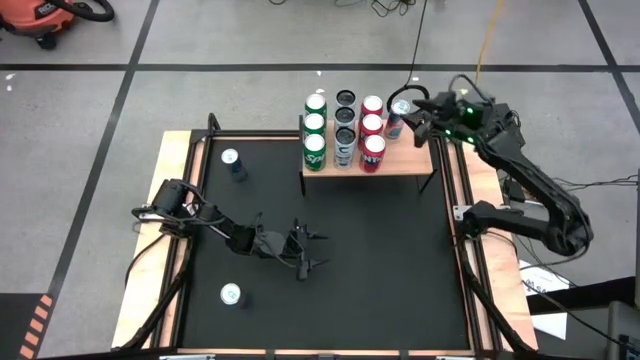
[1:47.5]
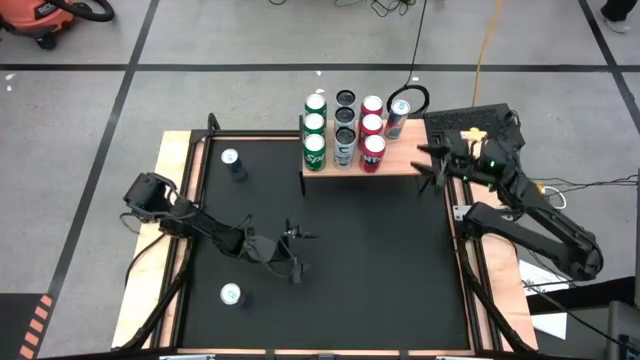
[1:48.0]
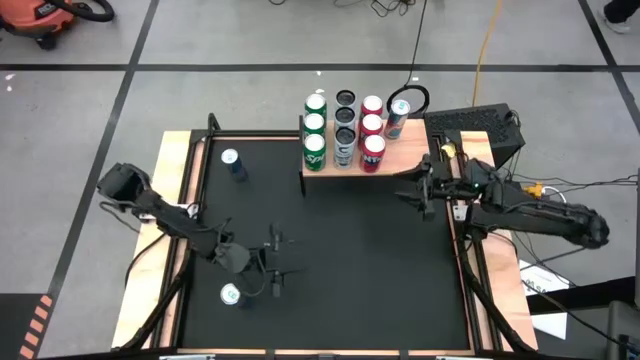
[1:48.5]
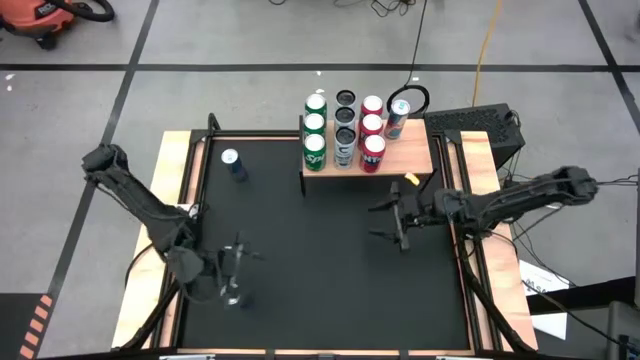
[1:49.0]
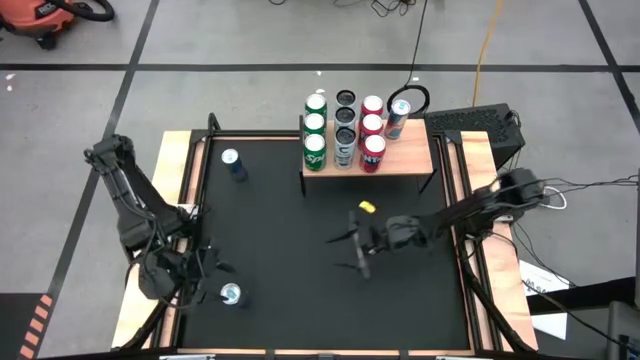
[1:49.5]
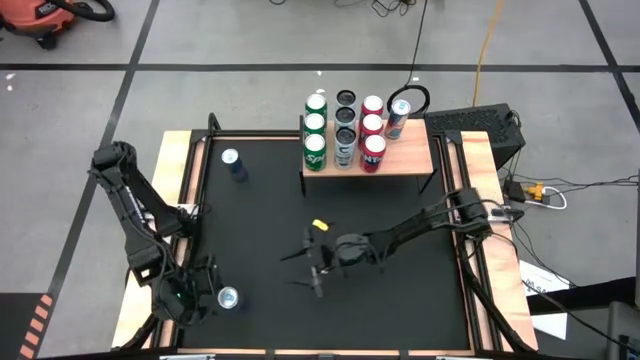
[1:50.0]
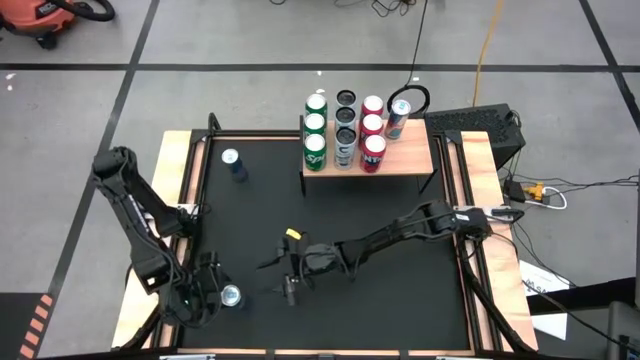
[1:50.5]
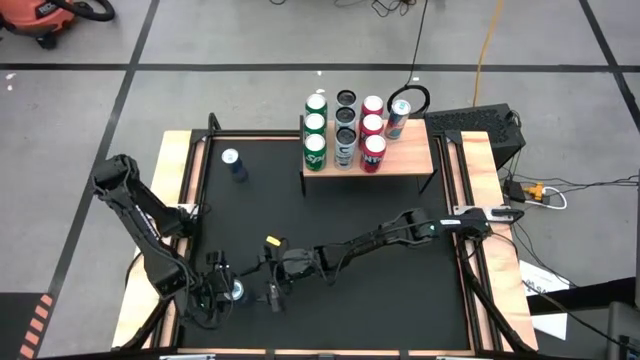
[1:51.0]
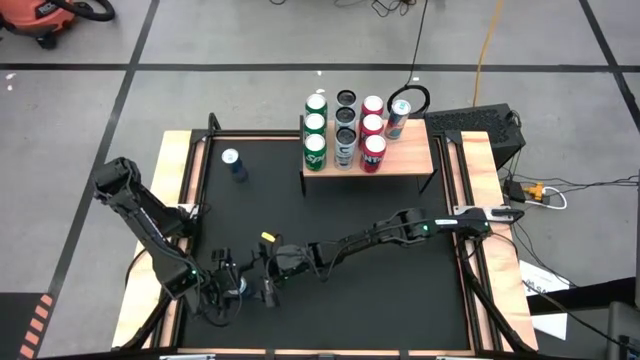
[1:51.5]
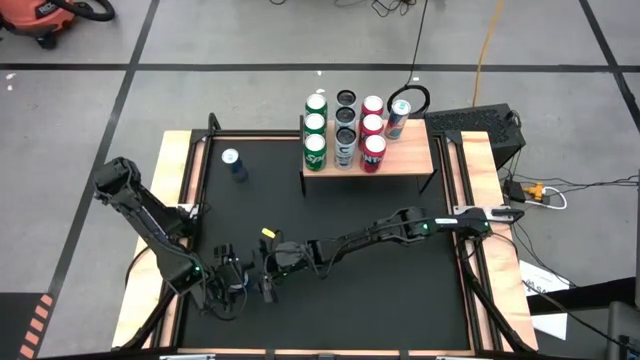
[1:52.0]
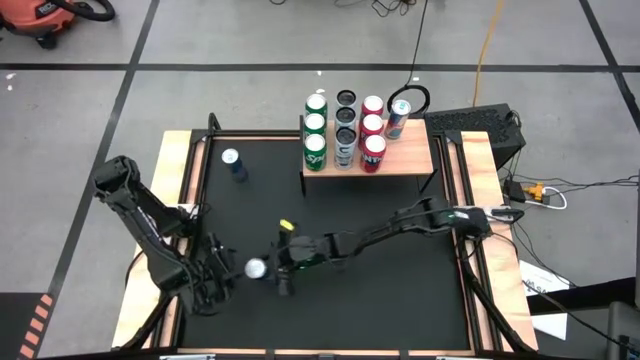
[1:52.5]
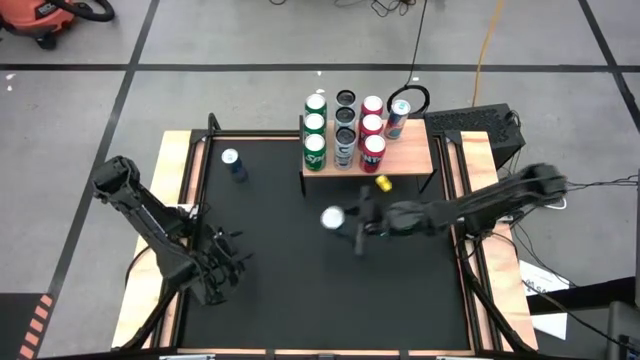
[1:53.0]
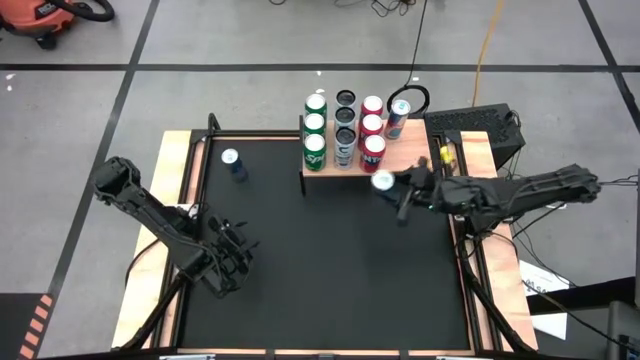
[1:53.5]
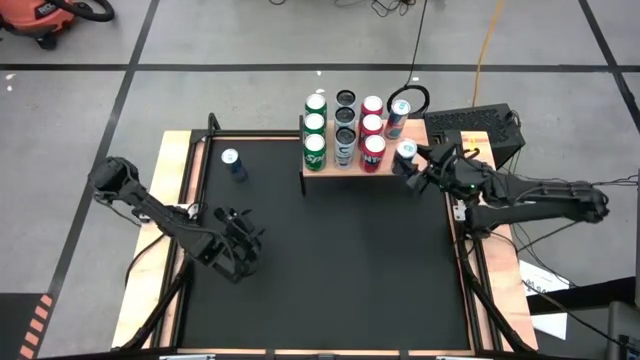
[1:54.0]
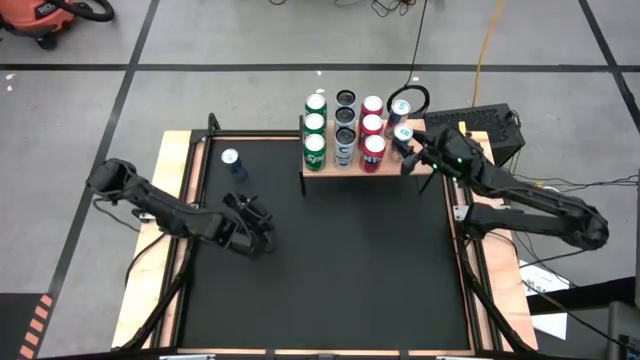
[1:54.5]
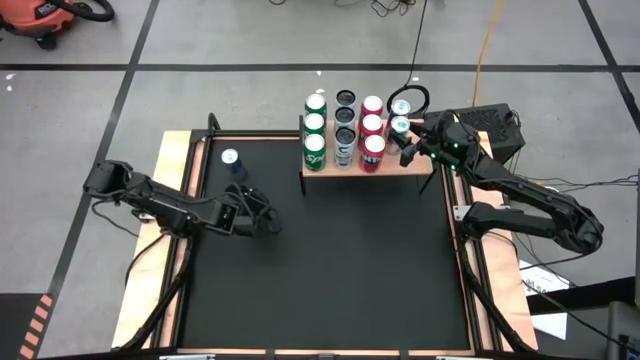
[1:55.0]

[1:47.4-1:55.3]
Task: Place canned beverage on shelf
Put the bottom blue soda can on the shelf

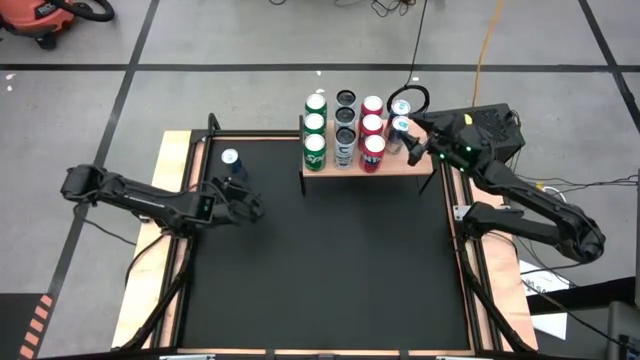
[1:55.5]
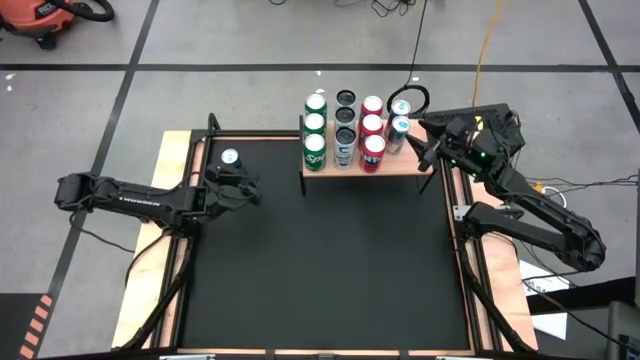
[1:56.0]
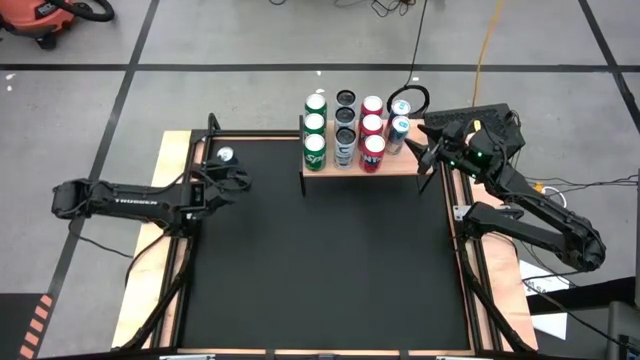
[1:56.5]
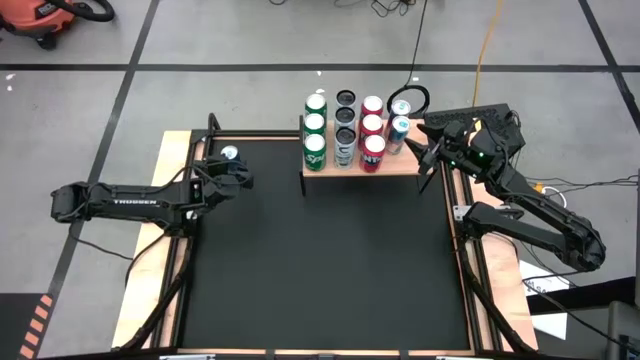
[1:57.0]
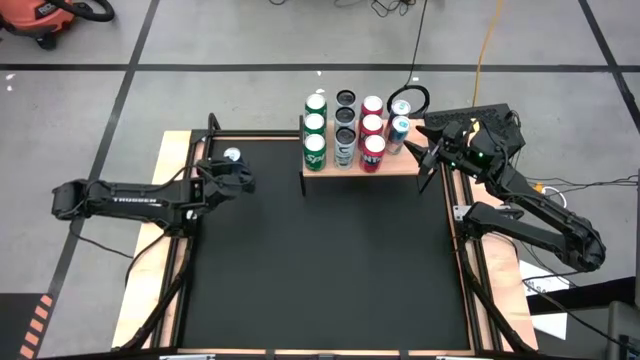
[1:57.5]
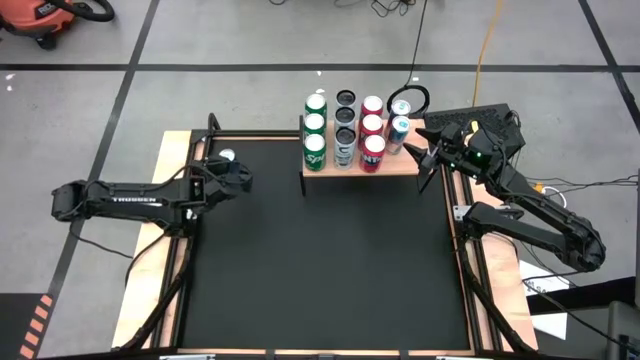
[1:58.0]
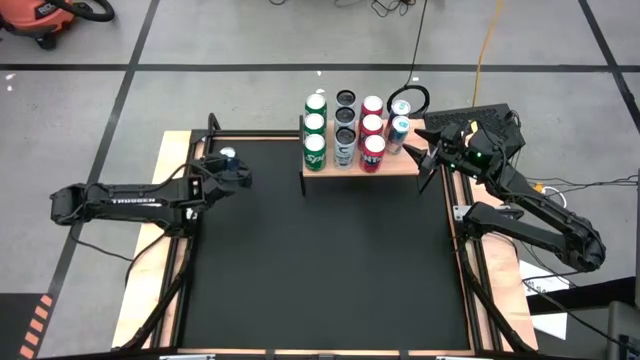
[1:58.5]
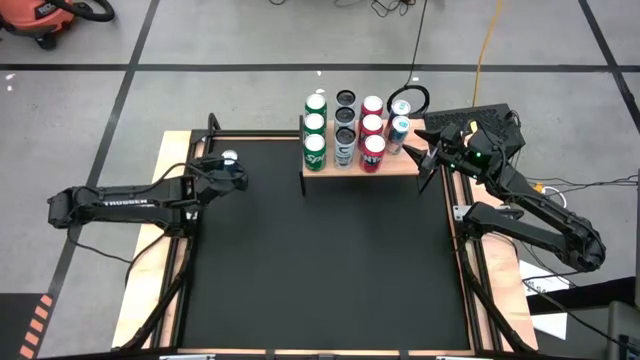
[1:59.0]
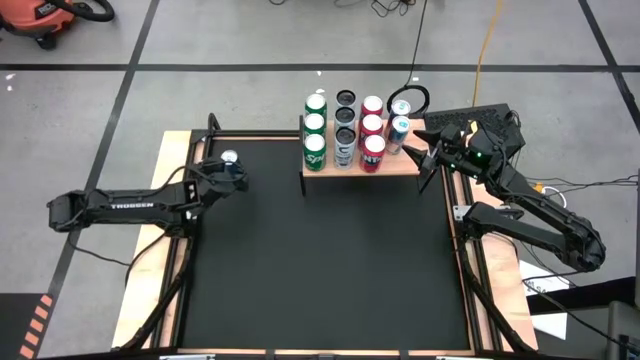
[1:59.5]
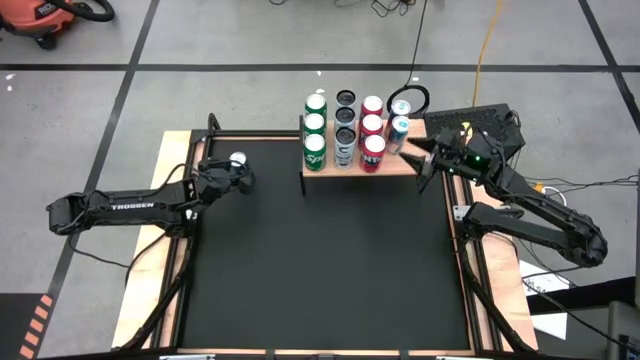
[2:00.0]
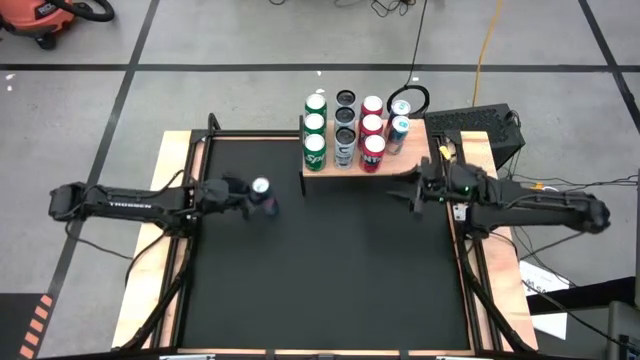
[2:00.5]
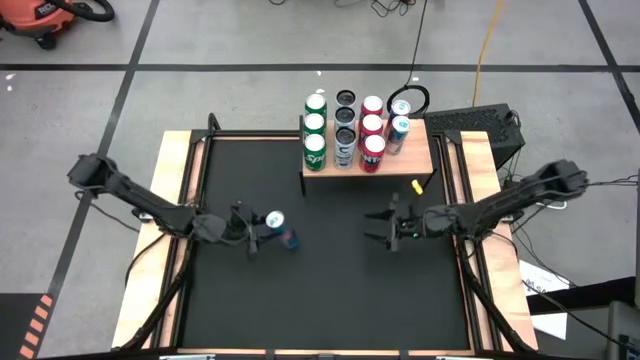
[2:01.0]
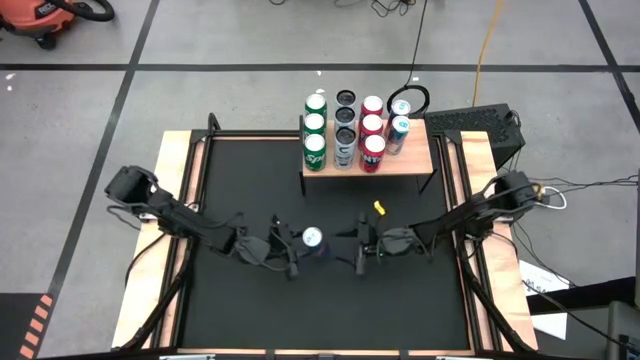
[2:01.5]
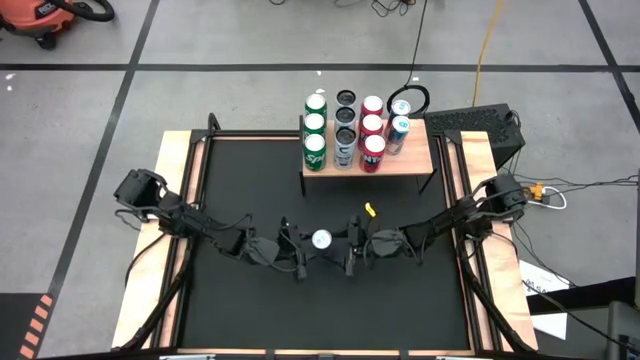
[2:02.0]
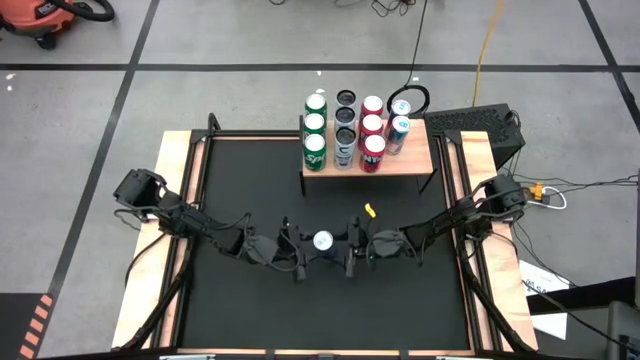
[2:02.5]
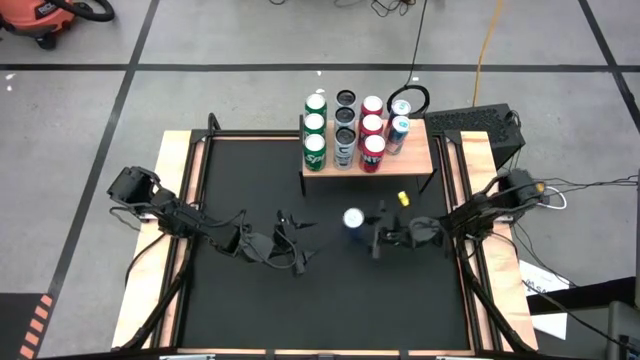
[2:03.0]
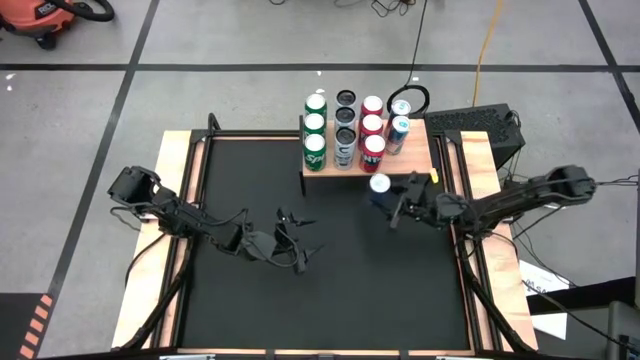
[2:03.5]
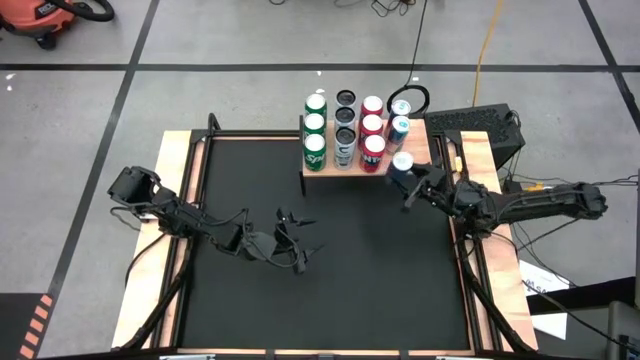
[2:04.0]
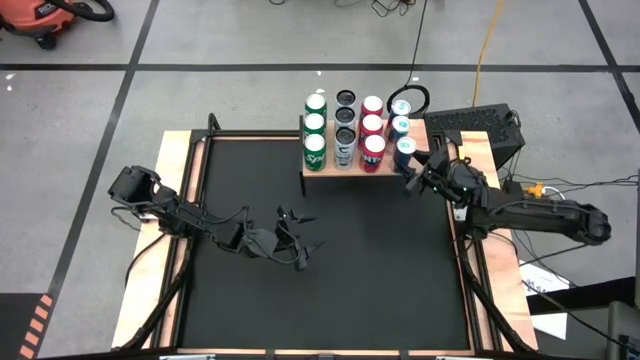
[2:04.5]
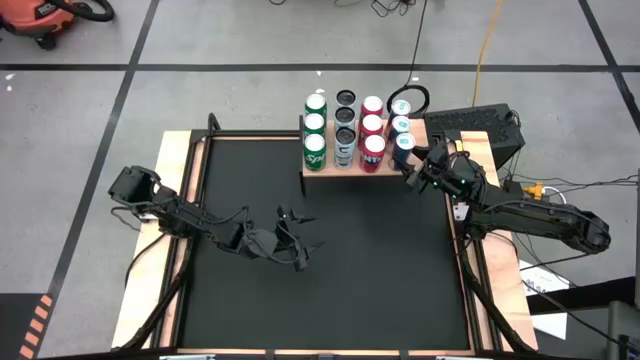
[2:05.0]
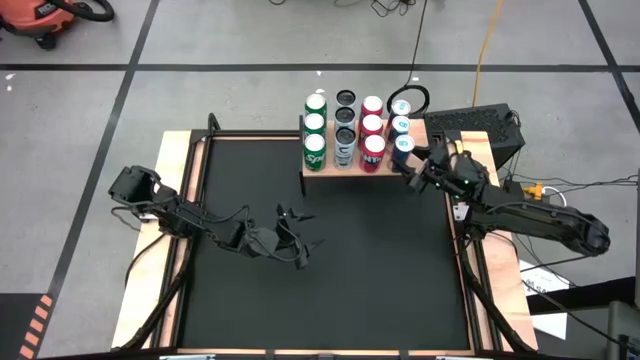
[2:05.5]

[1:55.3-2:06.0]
Put the blue soda can on the shelf

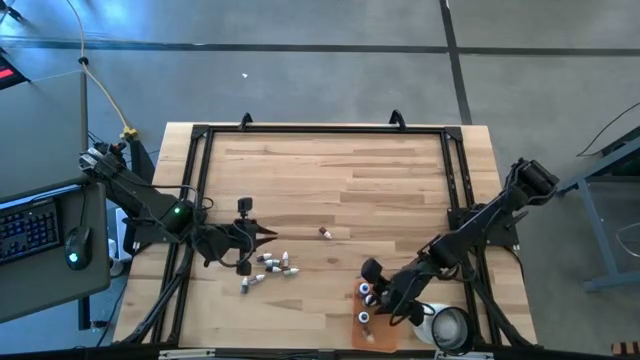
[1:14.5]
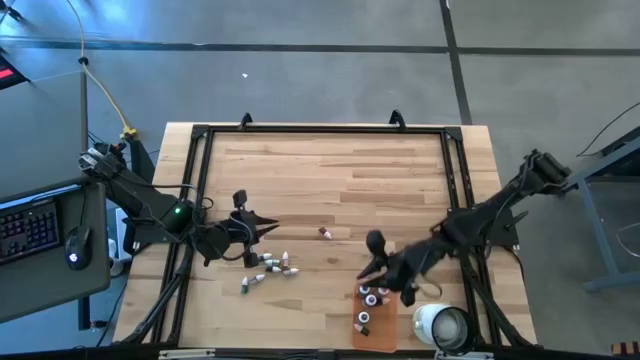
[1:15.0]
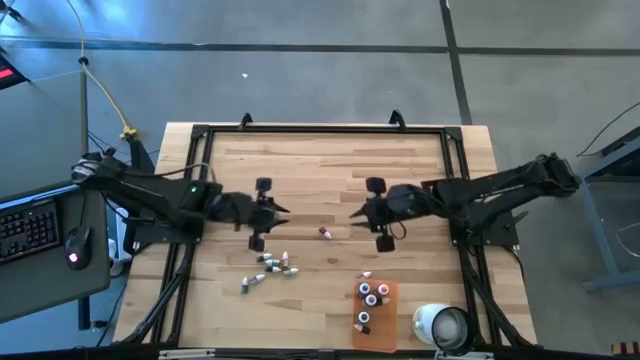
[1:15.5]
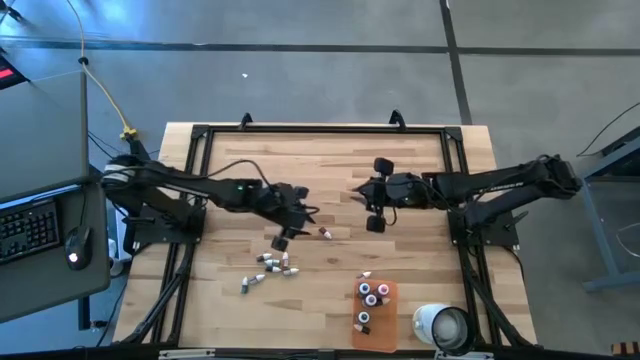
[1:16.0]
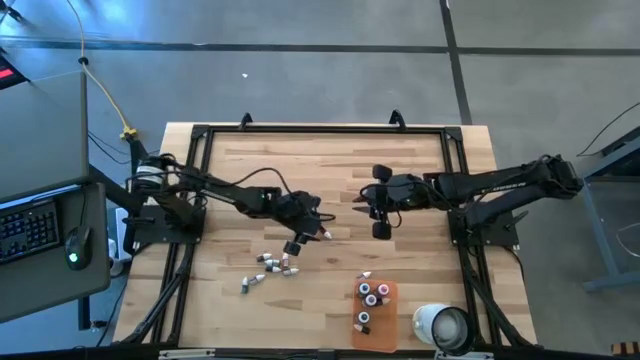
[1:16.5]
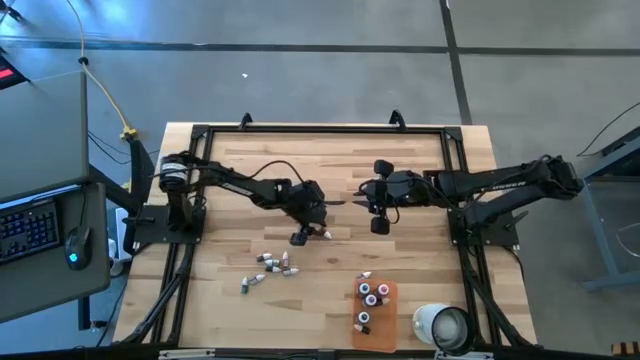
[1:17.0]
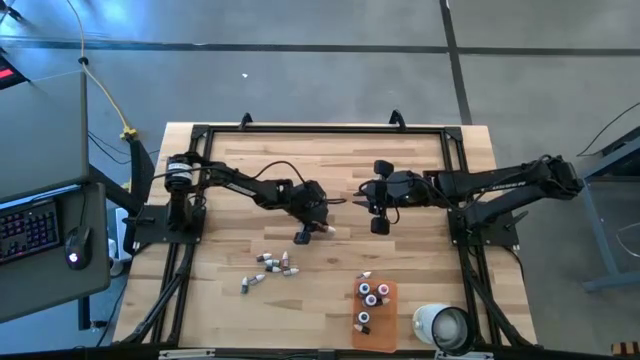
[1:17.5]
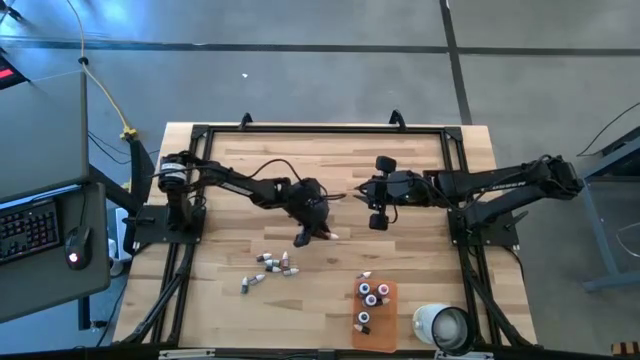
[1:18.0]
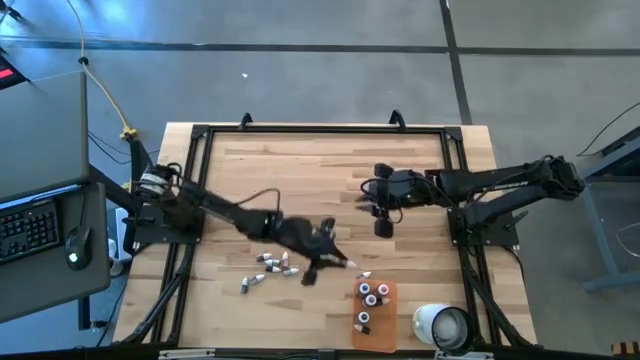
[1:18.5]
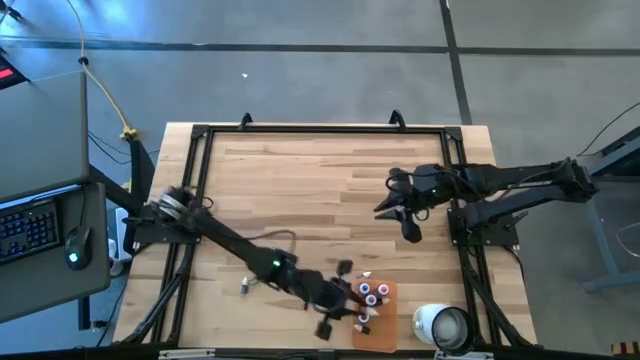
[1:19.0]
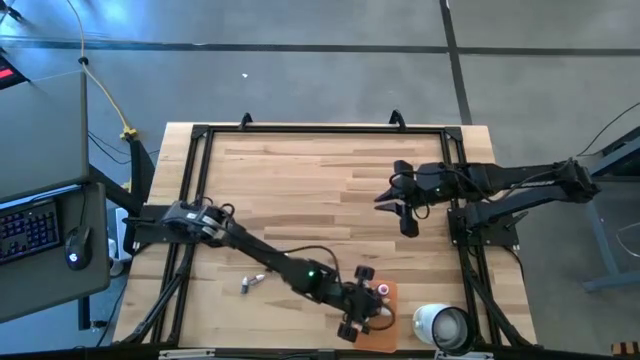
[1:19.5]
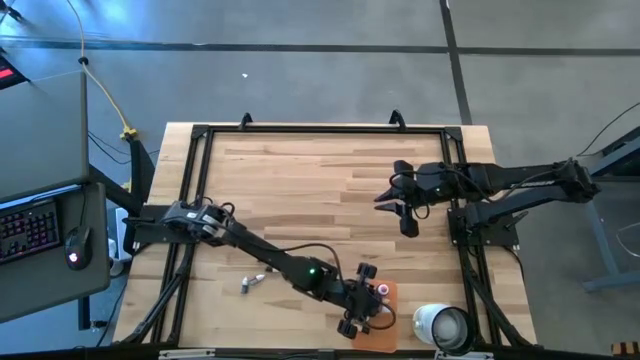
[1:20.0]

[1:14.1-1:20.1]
Task: Pick & Place food coloring
Put the top small orange food coloring bottle into the orange bin
